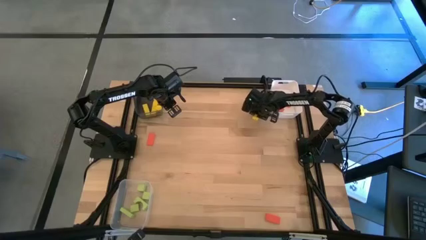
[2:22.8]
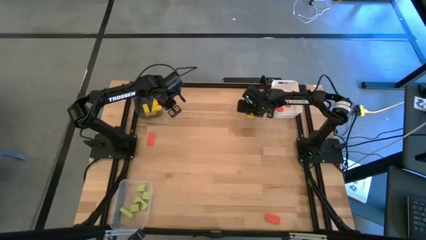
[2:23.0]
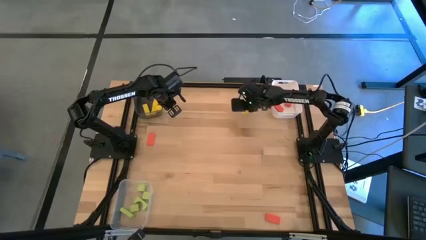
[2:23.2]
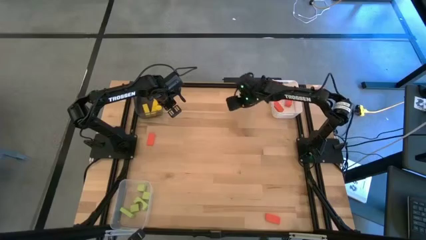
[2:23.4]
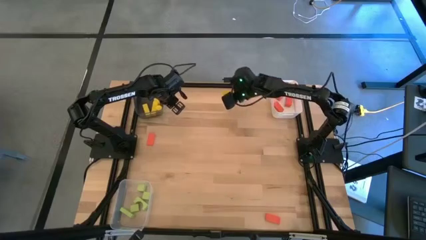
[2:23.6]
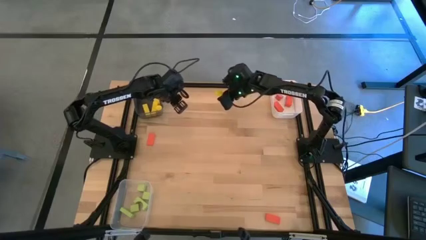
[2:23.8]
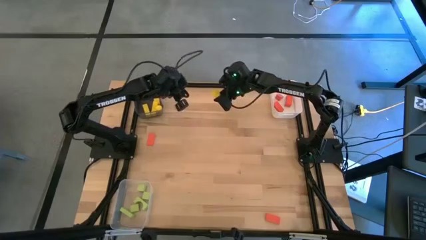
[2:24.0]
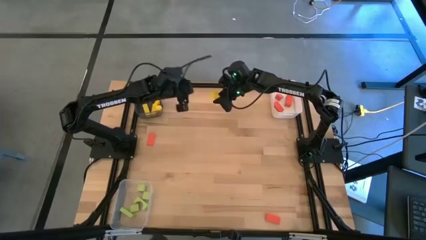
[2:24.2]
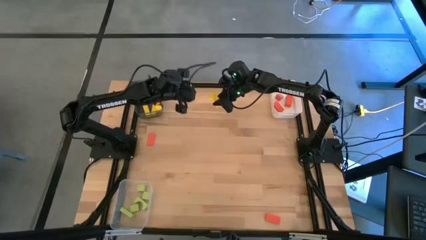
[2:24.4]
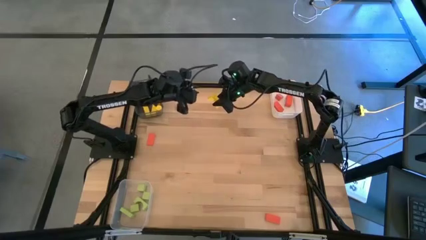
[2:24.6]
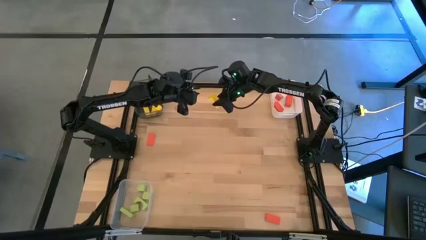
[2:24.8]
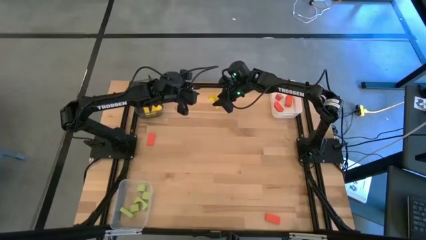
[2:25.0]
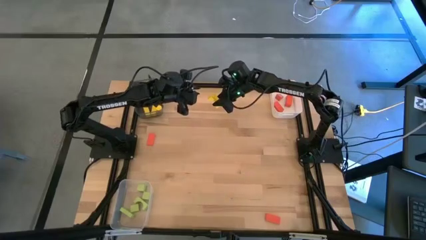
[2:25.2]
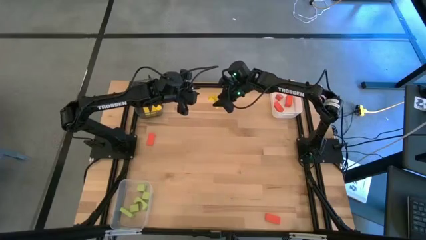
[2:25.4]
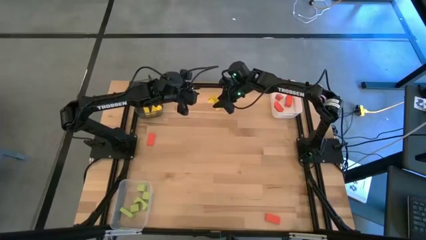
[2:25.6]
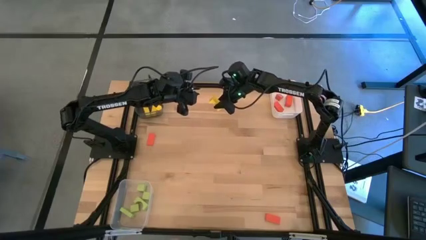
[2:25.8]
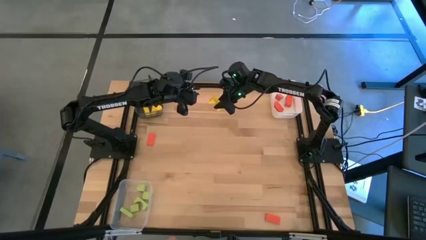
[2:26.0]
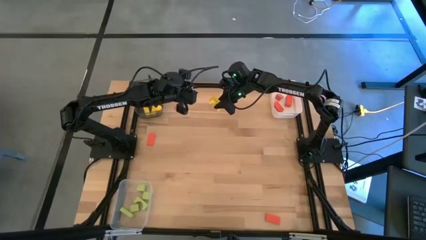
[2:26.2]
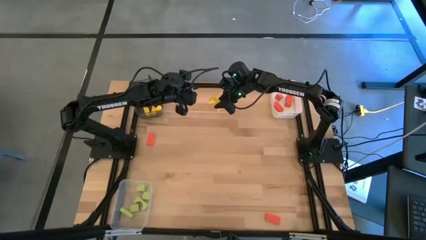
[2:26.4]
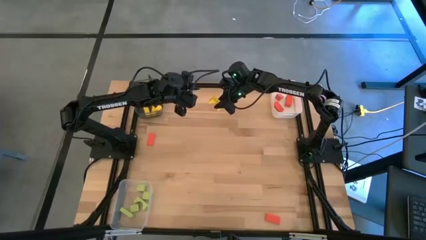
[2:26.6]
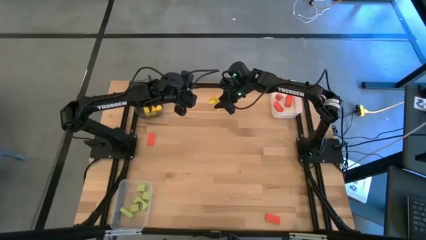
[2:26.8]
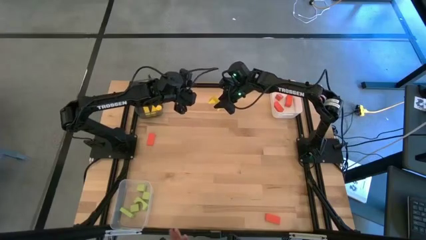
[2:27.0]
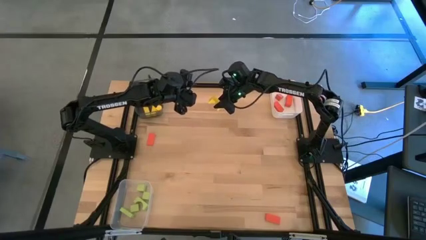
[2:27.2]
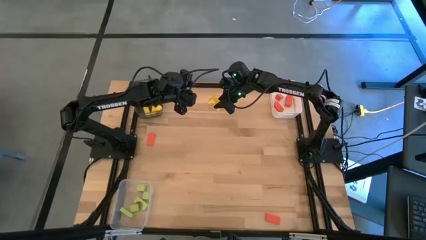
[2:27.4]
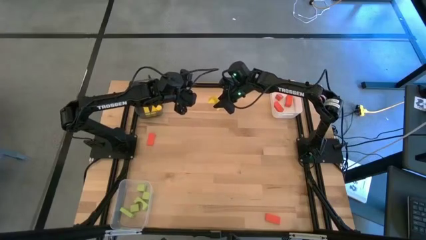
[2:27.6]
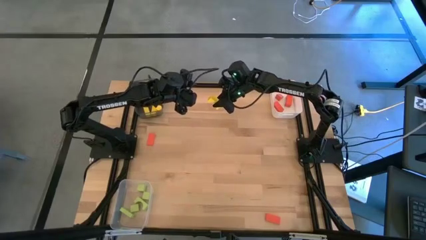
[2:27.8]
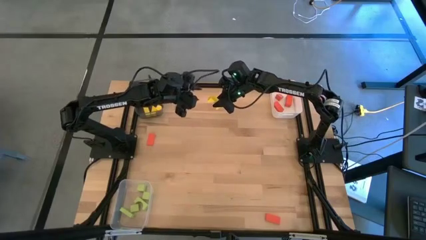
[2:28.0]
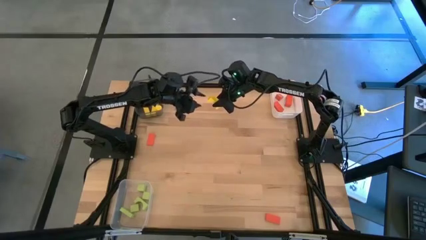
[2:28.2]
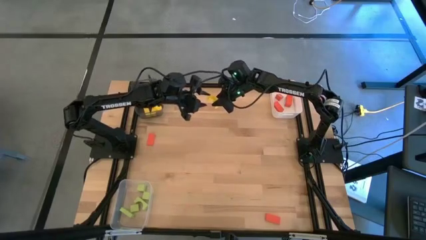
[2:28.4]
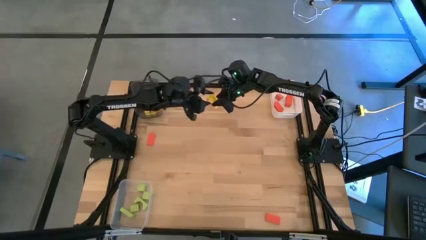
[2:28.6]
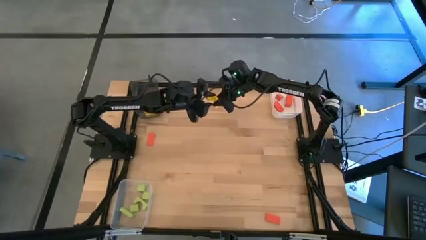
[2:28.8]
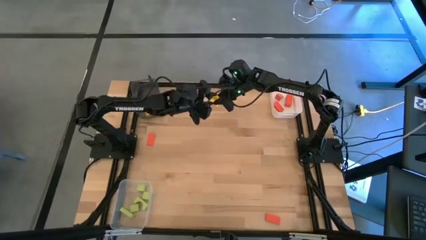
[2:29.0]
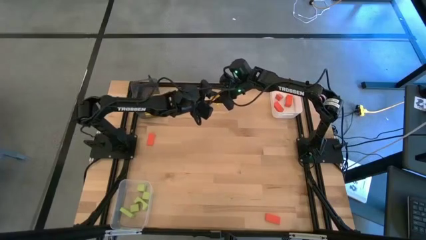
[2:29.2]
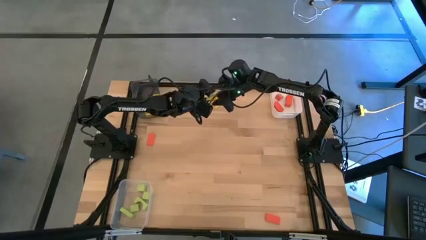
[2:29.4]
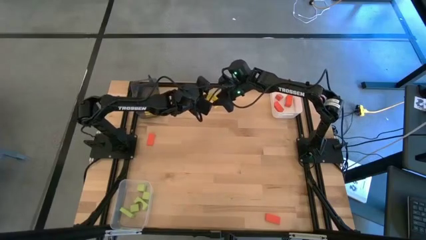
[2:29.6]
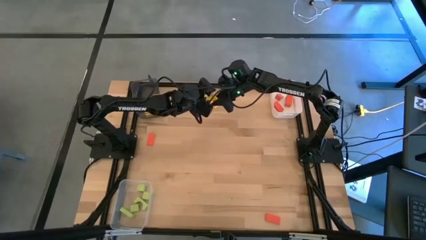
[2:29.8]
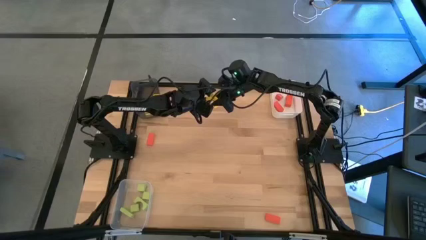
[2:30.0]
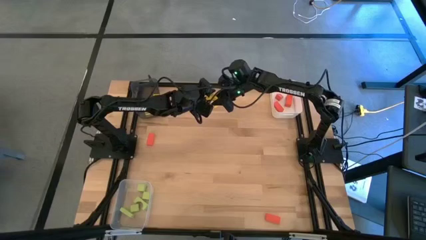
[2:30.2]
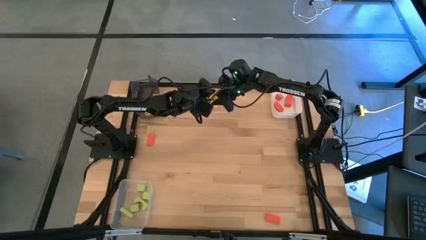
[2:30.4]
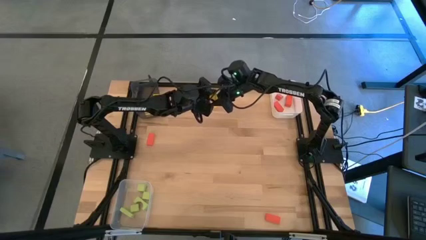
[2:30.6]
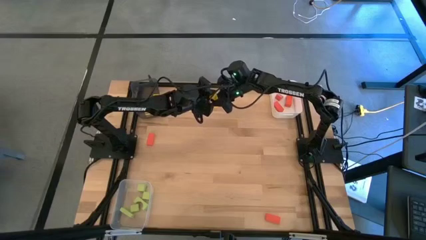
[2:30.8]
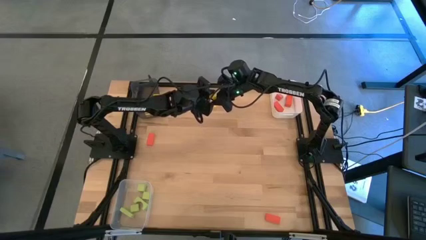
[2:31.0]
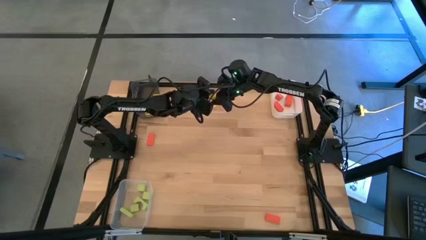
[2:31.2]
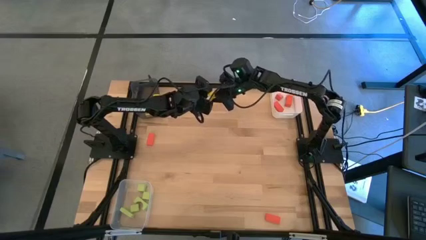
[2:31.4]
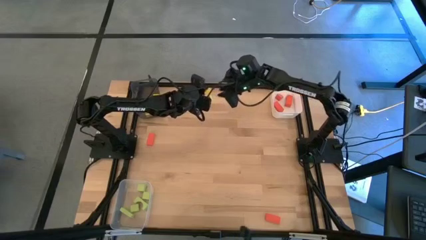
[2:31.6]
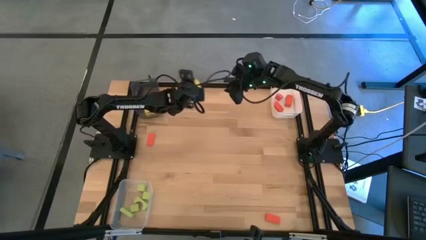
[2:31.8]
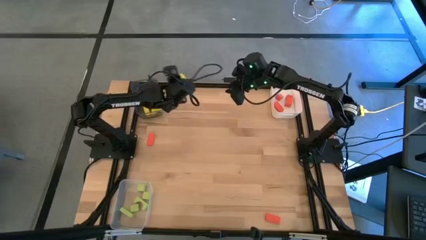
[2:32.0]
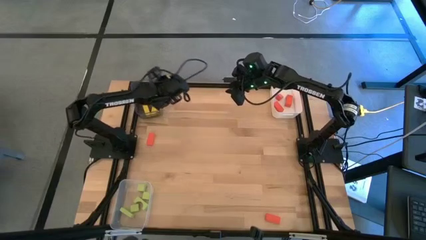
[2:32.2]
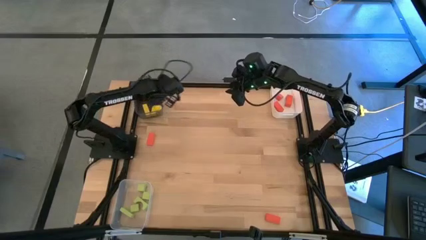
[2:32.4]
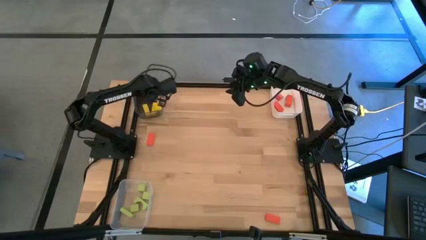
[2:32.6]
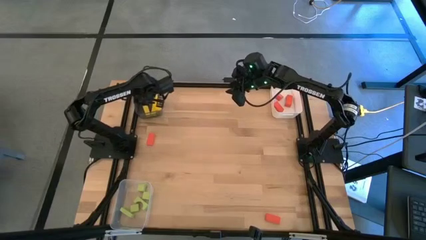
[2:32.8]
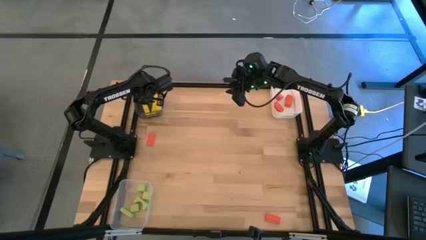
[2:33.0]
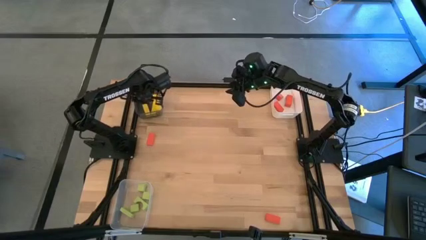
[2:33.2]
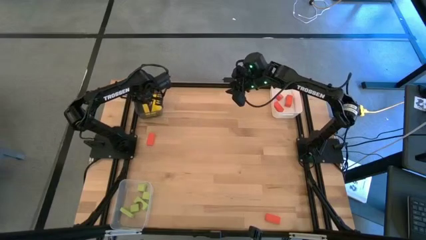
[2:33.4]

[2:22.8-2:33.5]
Task: Sort & place blocks by color
Put the yellow block into the black bin

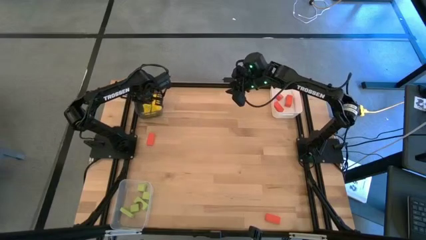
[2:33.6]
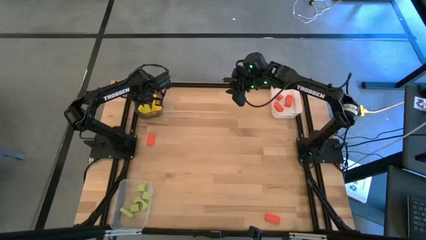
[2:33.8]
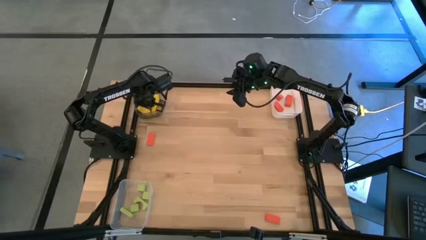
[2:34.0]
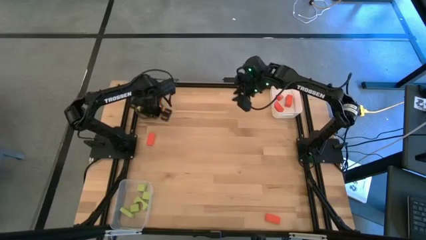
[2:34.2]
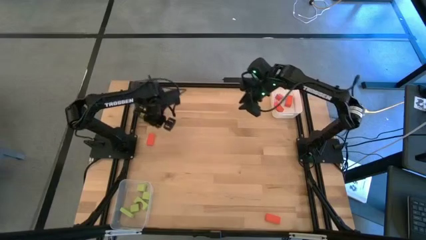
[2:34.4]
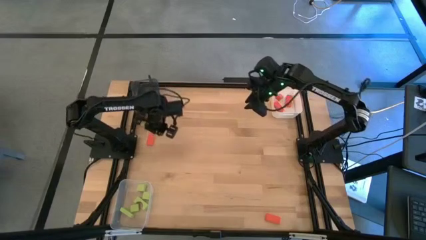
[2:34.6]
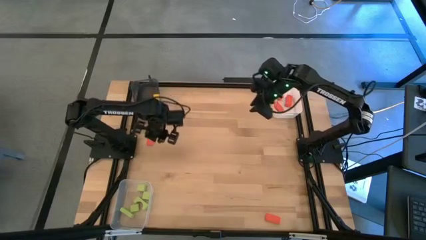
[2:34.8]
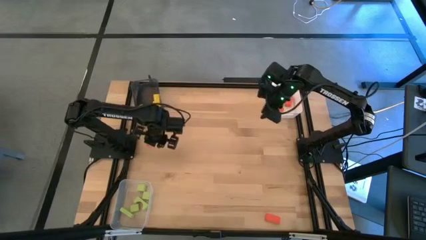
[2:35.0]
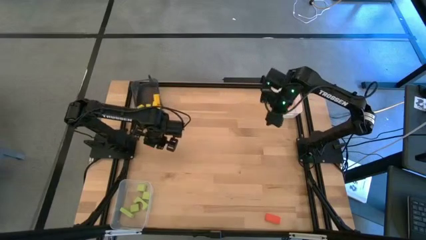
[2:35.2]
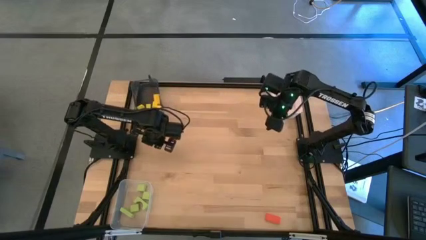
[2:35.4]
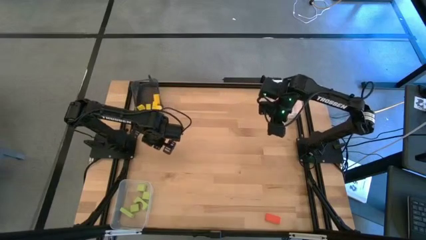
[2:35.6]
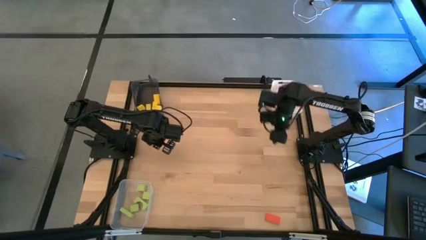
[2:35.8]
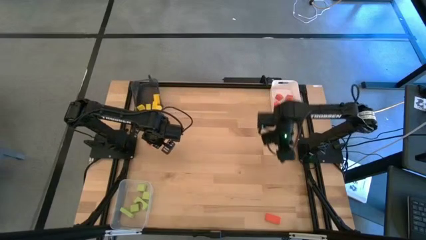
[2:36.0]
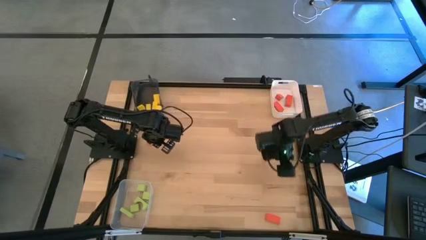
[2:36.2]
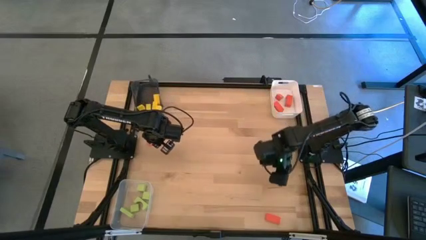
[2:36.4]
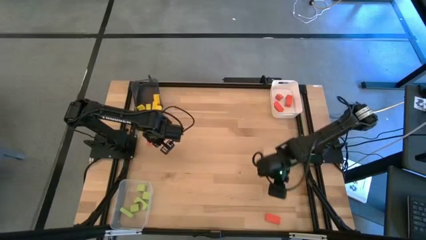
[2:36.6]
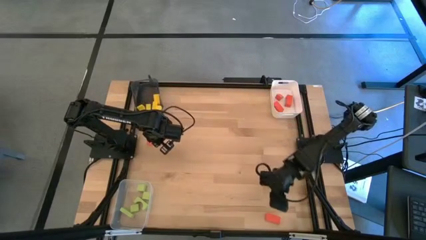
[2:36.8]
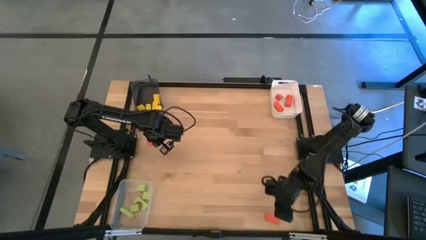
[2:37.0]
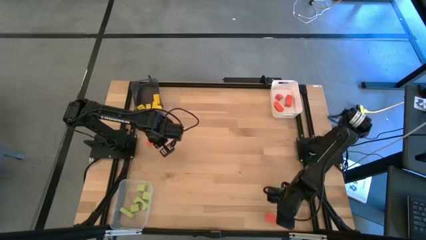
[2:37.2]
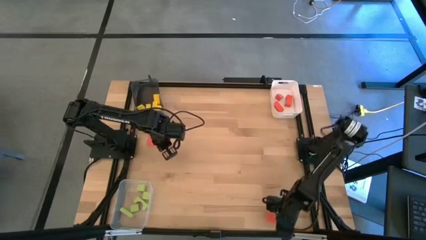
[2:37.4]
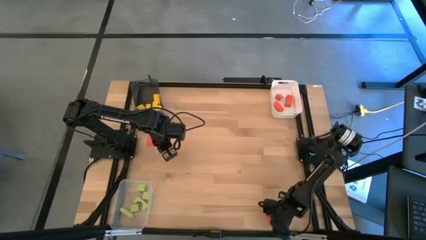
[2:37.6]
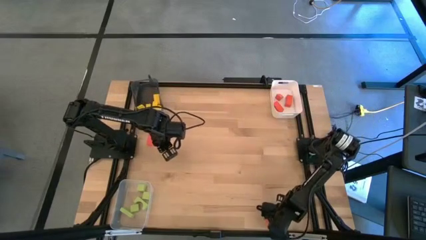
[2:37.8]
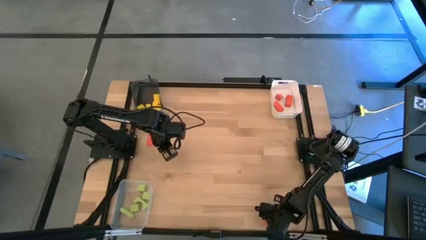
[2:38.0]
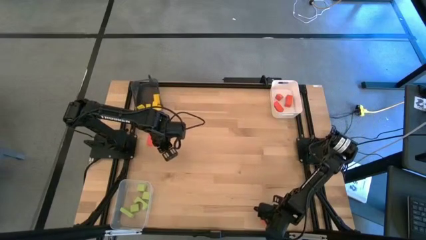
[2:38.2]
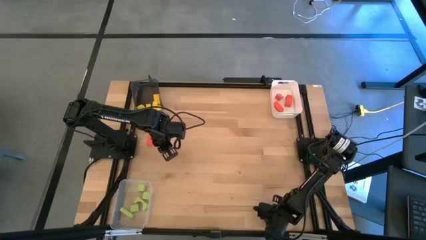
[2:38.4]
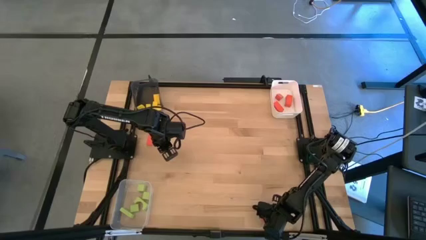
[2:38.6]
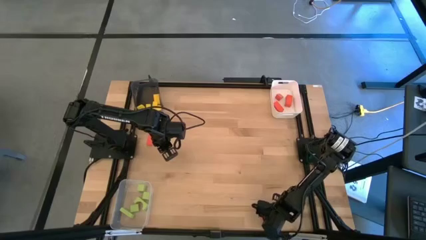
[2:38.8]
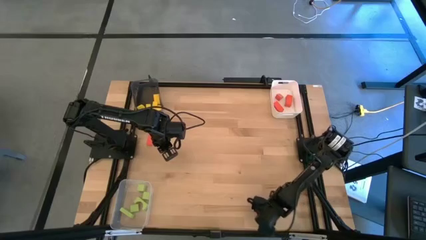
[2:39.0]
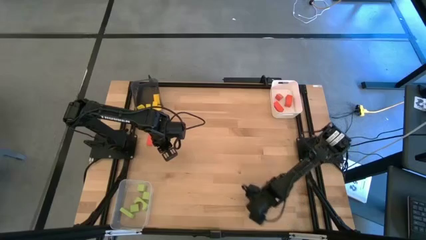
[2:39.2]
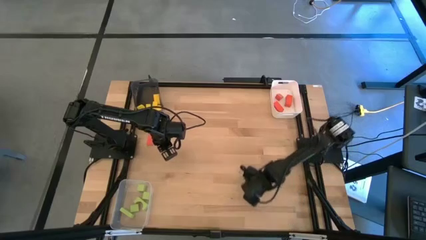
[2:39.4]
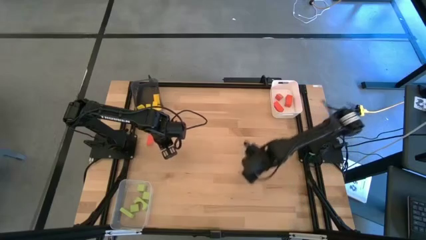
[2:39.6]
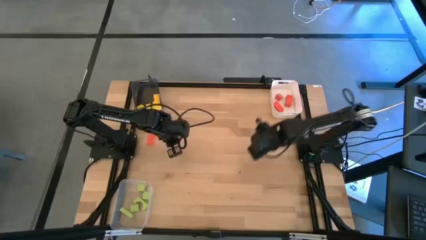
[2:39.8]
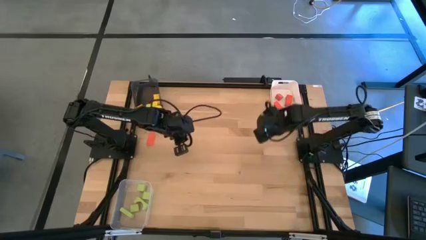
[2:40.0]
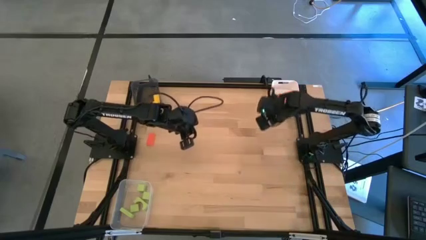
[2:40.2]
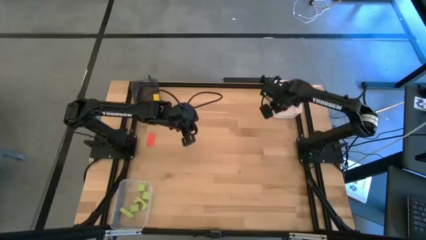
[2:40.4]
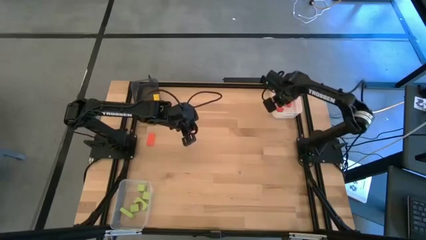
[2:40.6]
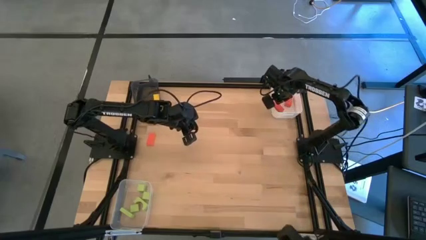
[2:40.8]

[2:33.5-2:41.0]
Put the orange block into the white bin
